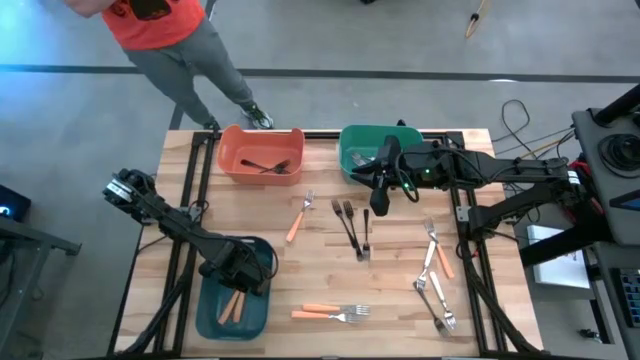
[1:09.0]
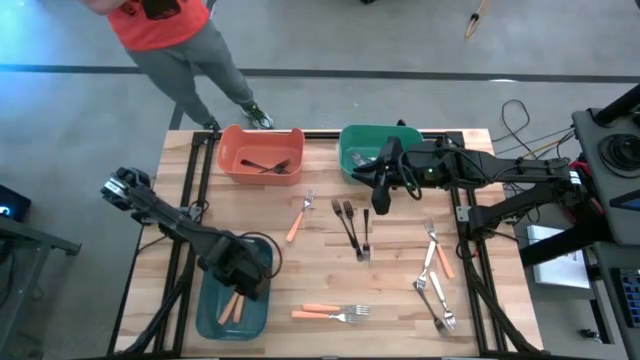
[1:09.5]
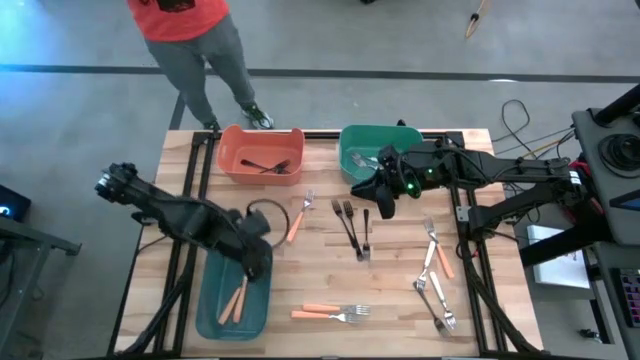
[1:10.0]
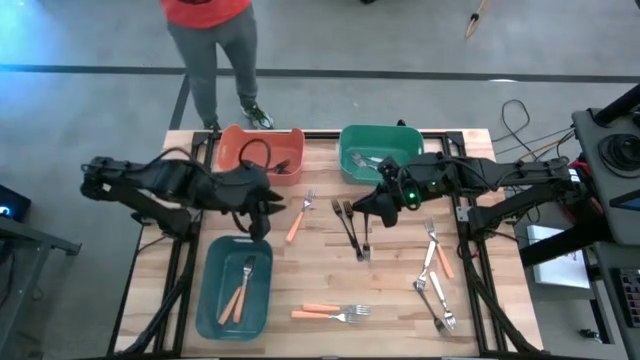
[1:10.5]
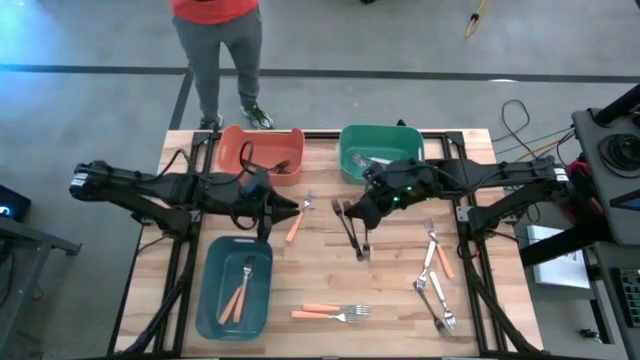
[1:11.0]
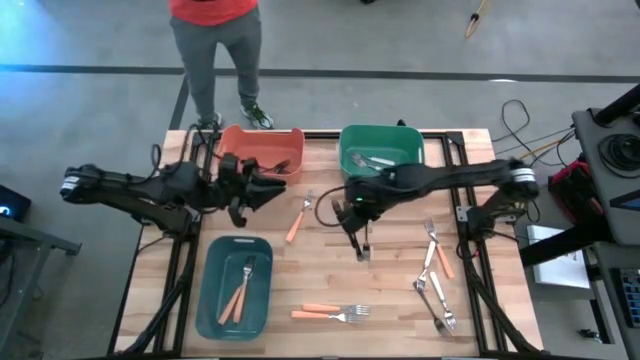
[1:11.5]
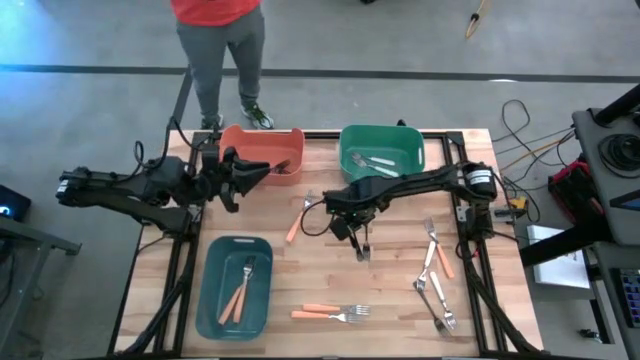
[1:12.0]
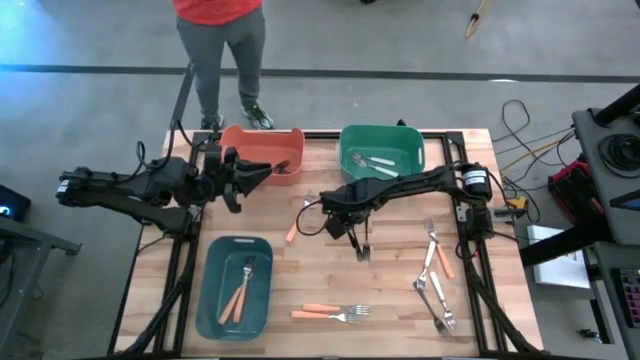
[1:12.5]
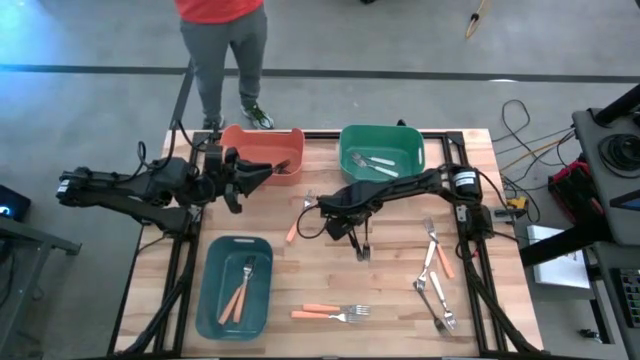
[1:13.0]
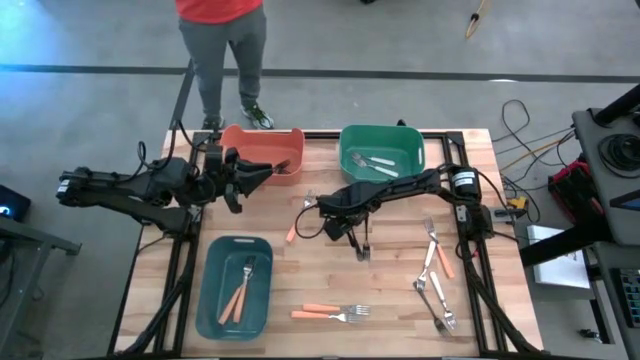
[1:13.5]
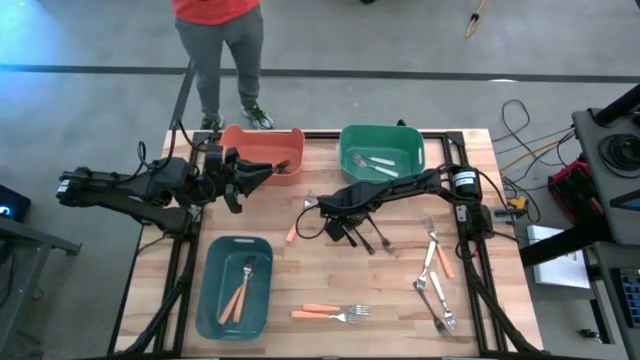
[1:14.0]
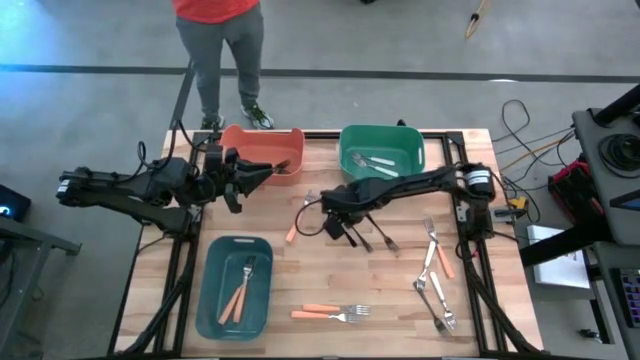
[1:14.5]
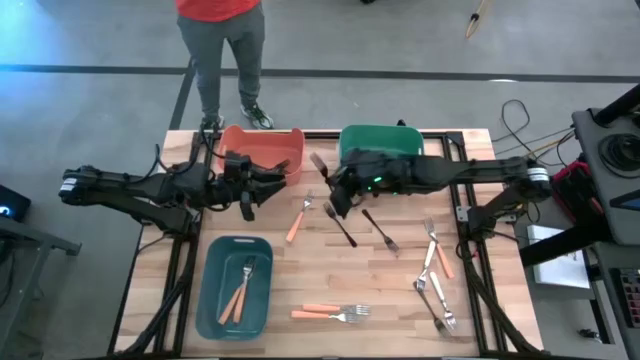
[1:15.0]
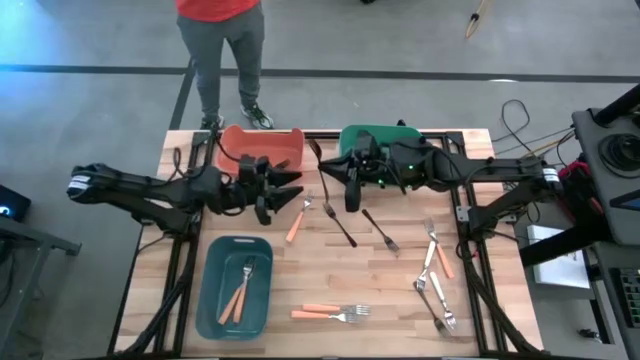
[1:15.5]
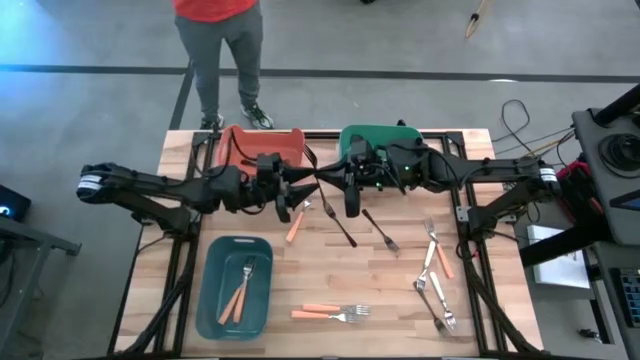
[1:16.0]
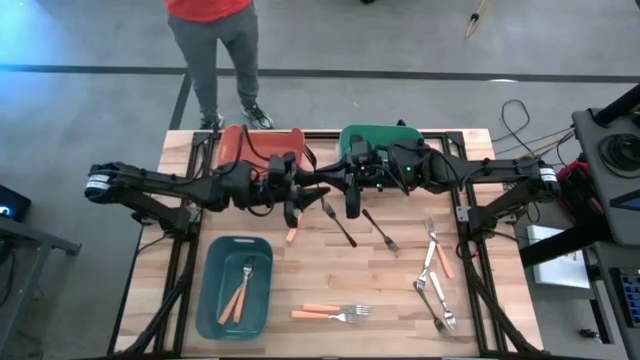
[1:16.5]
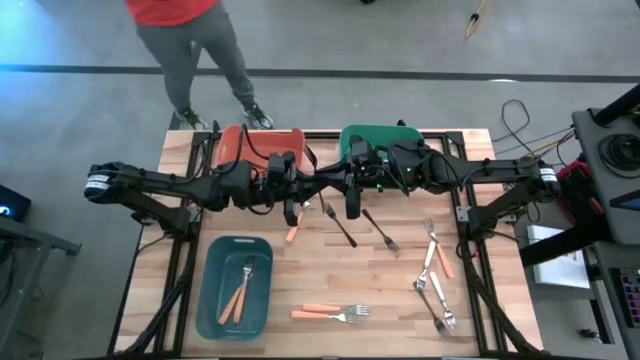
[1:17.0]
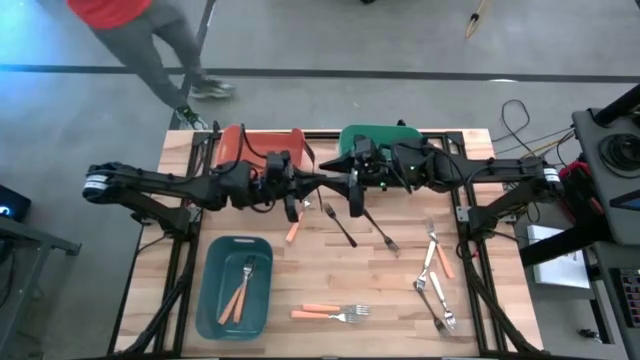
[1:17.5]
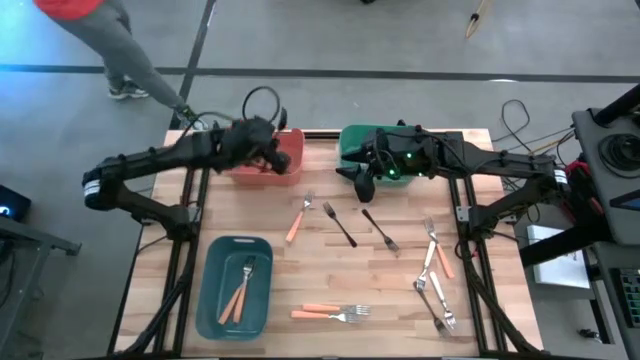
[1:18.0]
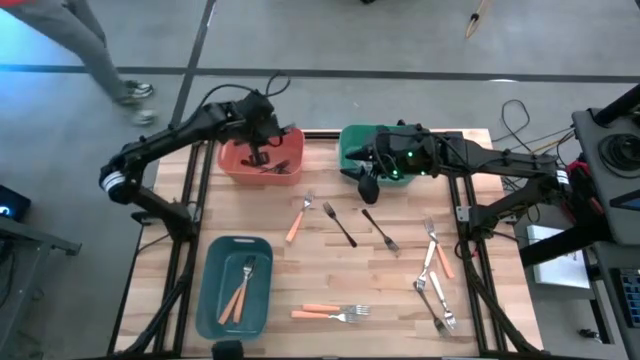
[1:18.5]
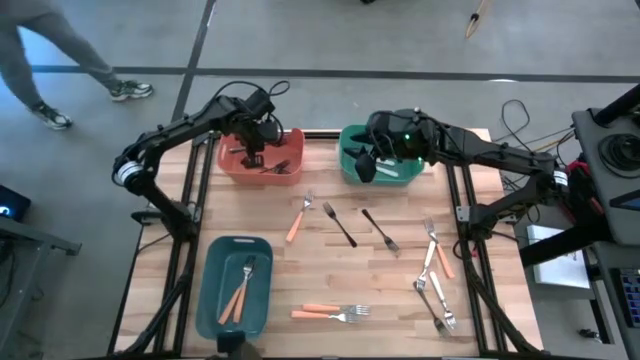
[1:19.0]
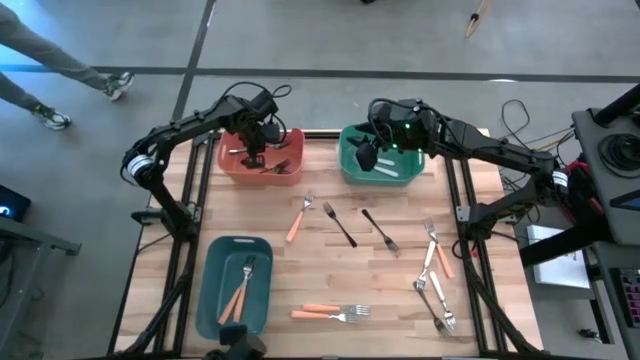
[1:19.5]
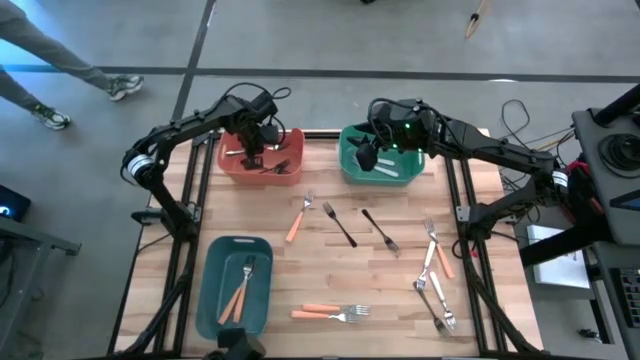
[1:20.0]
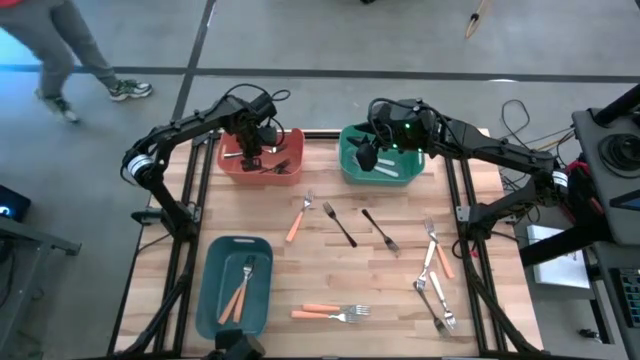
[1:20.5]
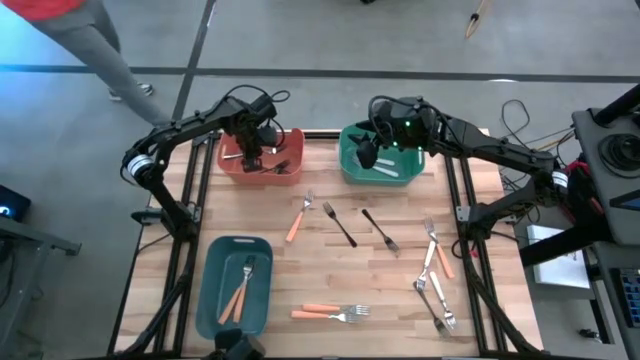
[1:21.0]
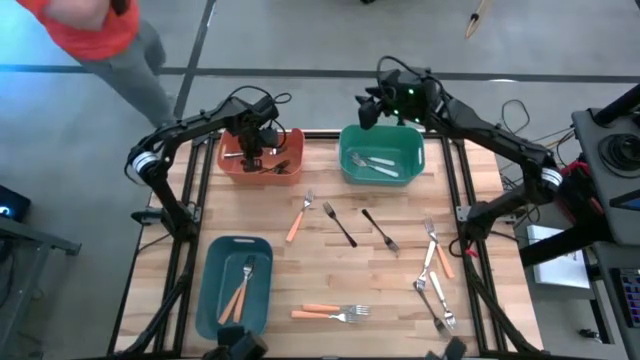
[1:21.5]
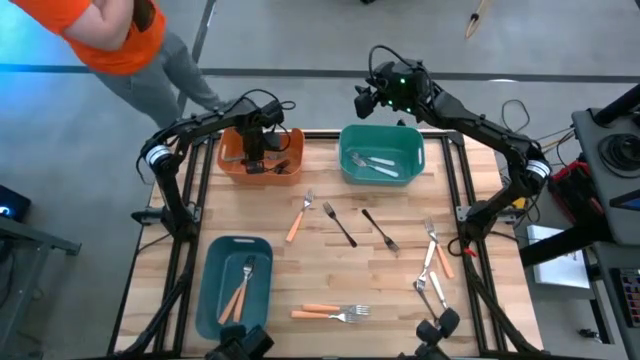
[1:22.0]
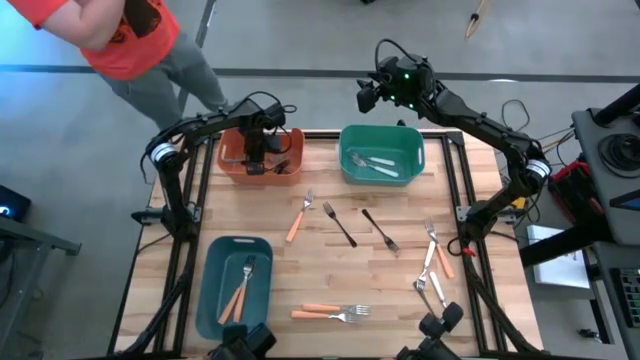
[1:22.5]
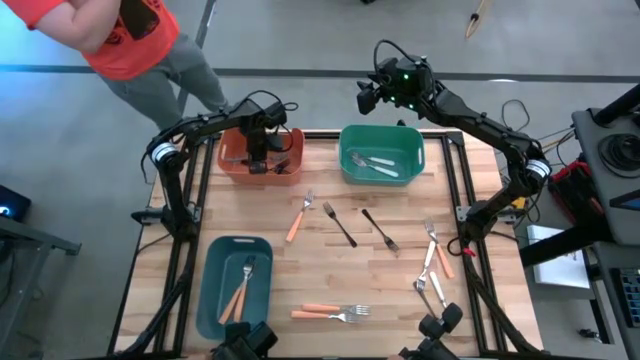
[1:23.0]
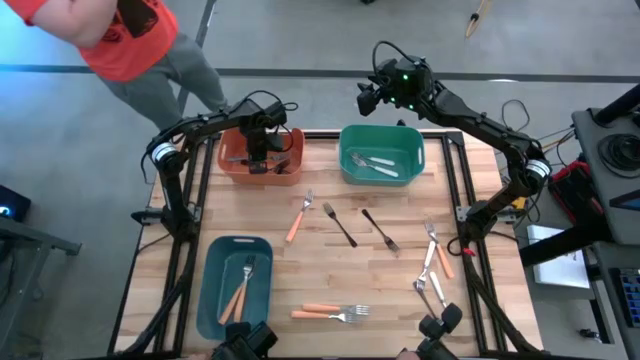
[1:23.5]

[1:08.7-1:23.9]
Task: Sort silverware by color (type)
Put the black fork into the orange bin

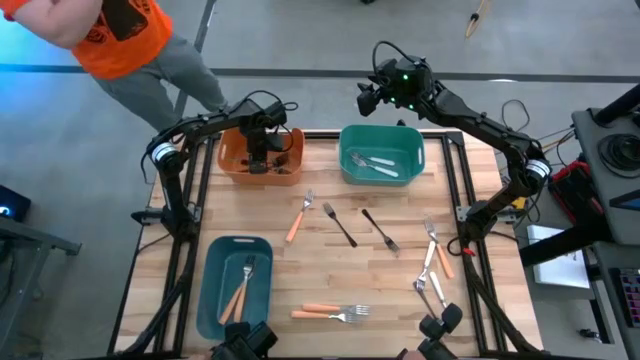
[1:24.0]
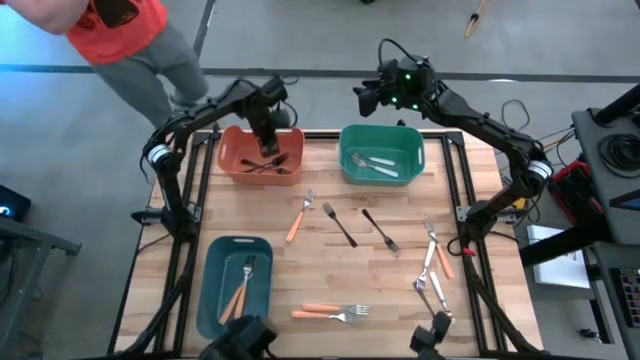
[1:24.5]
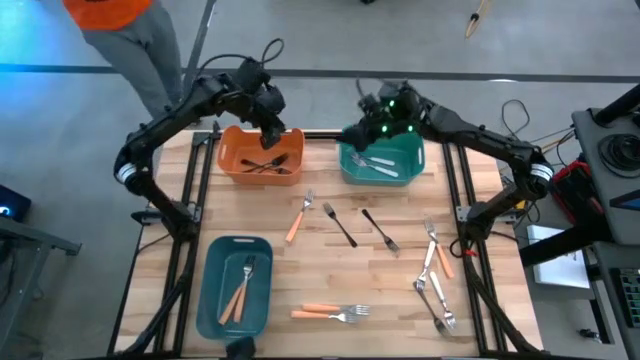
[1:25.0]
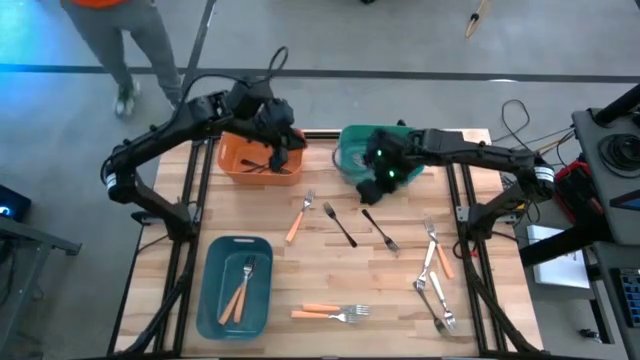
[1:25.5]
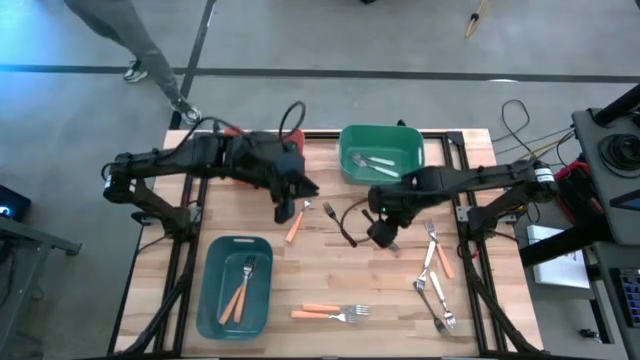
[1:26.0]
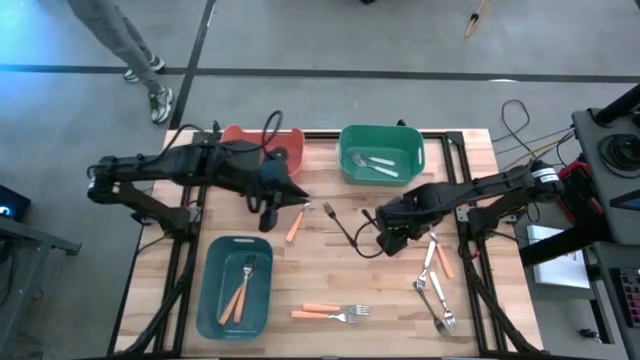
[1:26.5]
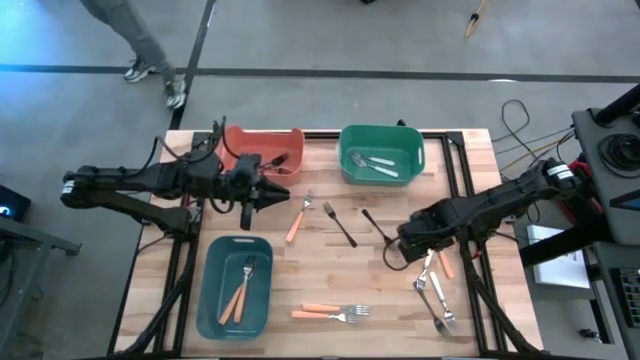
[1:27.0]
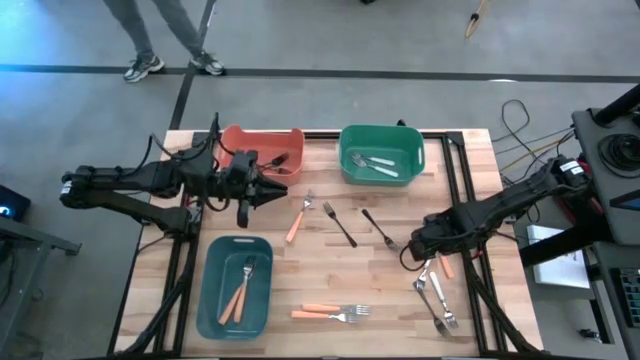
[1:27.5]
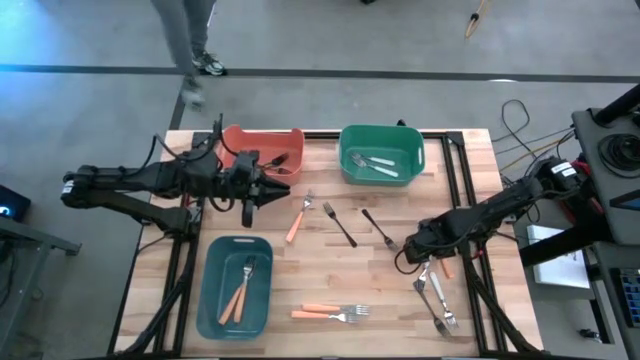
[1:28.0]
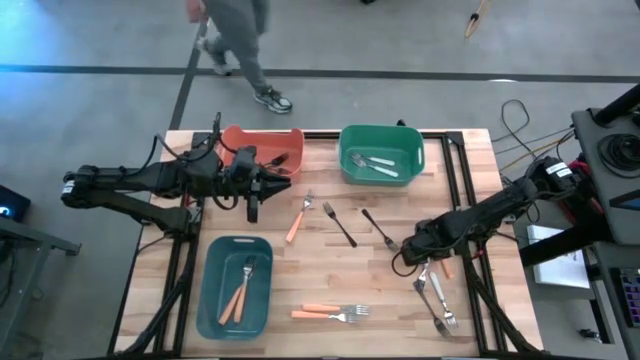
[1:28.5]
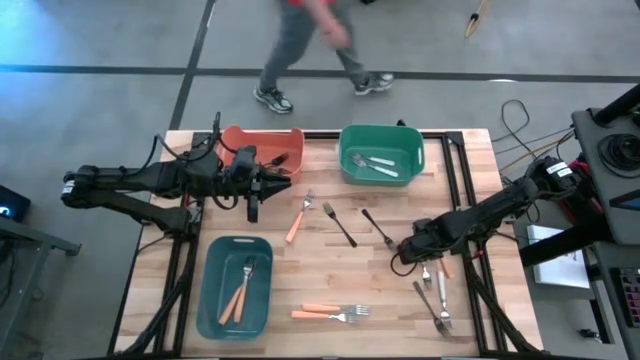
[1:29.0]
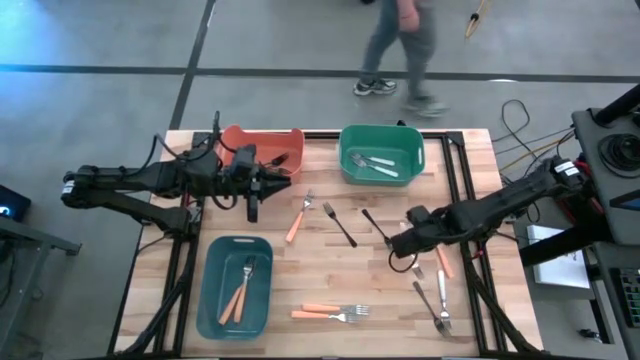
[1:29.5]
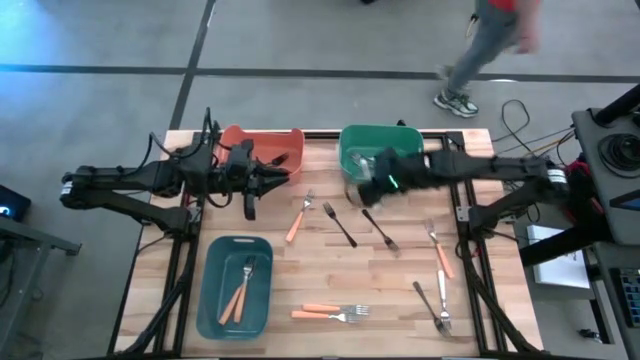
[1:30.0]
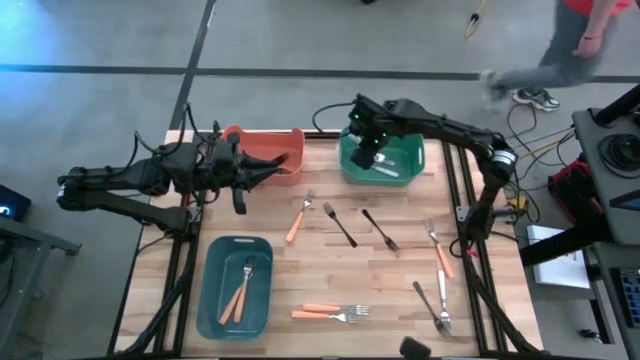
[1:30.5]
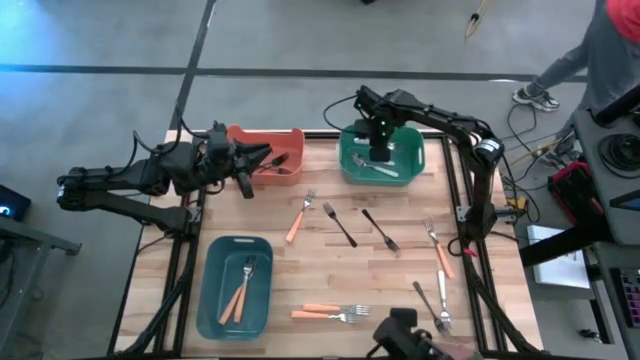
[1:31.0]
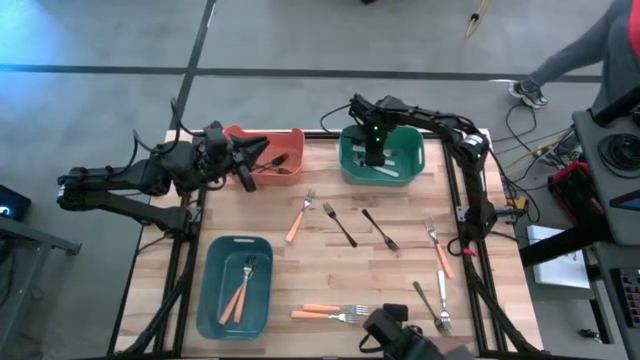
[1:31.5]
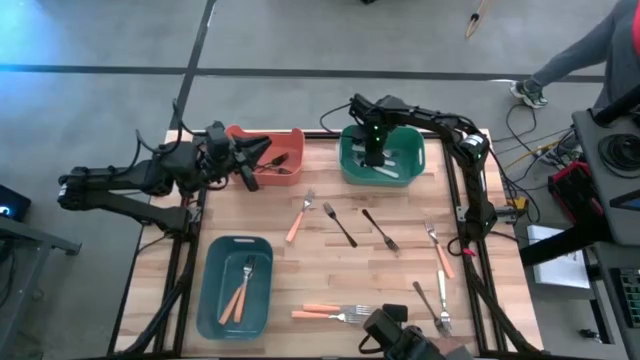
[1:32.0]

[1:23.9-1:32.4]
Put the white fork into the green bin
